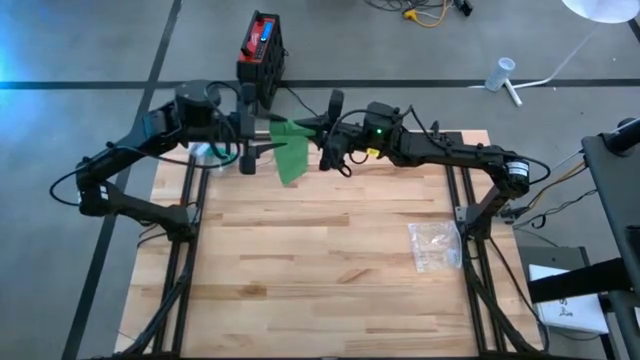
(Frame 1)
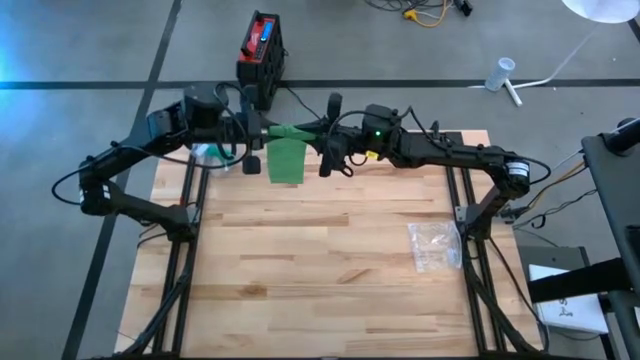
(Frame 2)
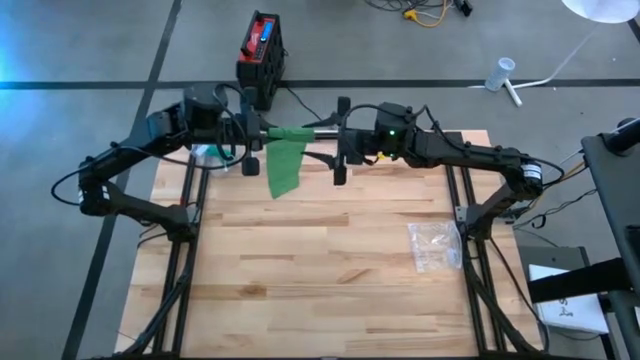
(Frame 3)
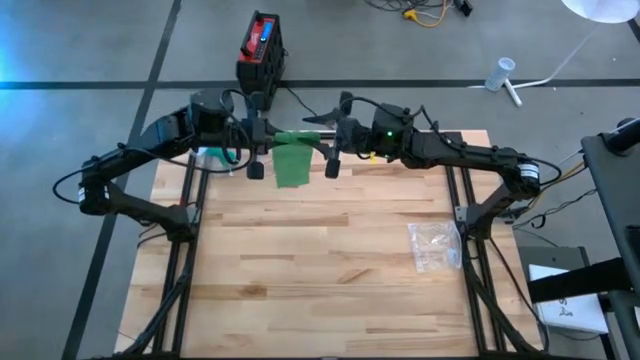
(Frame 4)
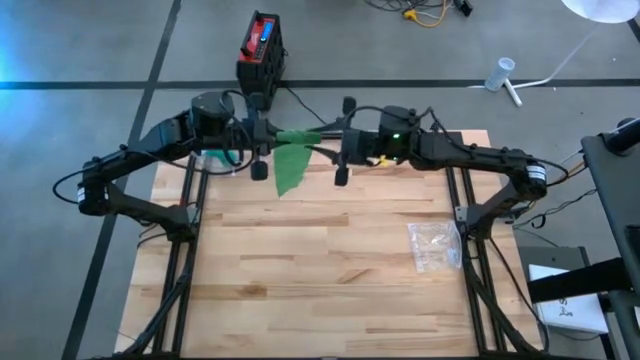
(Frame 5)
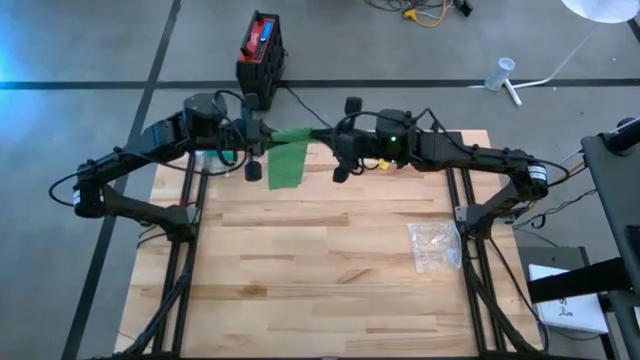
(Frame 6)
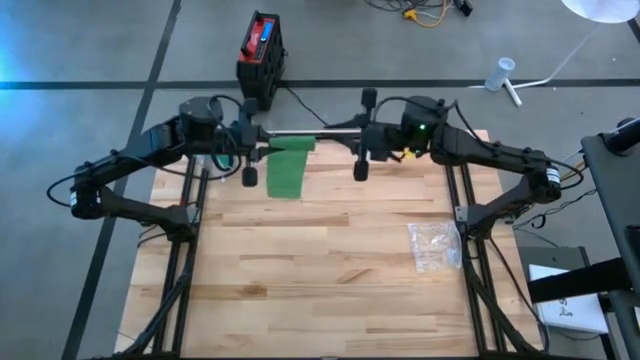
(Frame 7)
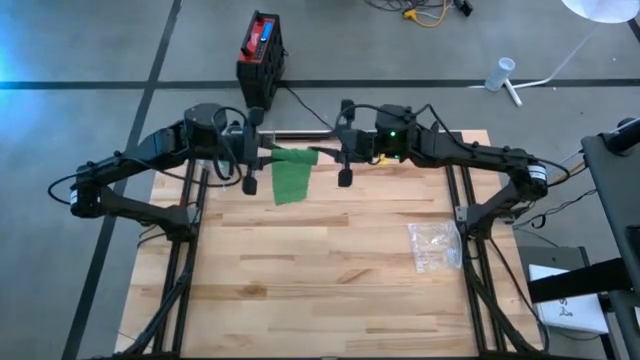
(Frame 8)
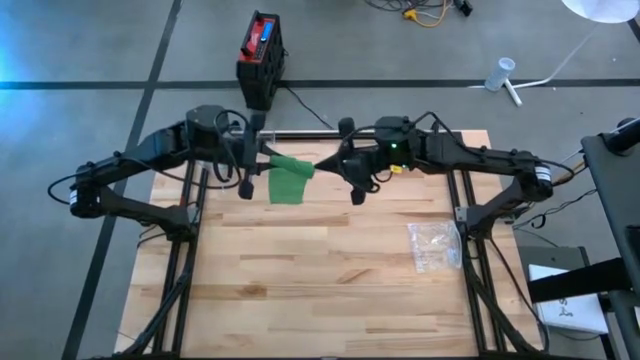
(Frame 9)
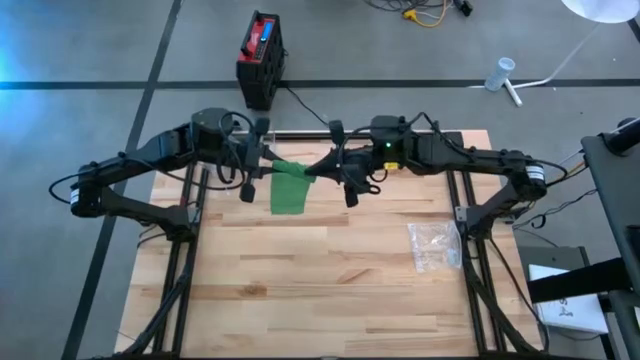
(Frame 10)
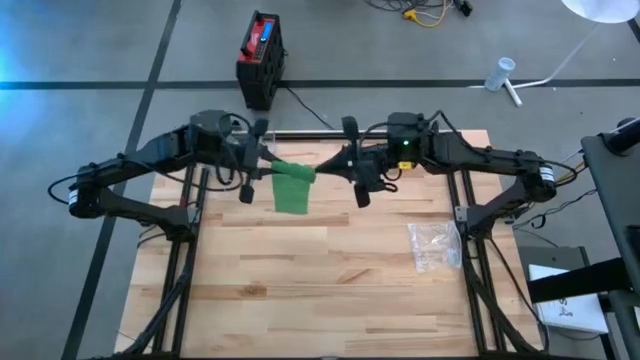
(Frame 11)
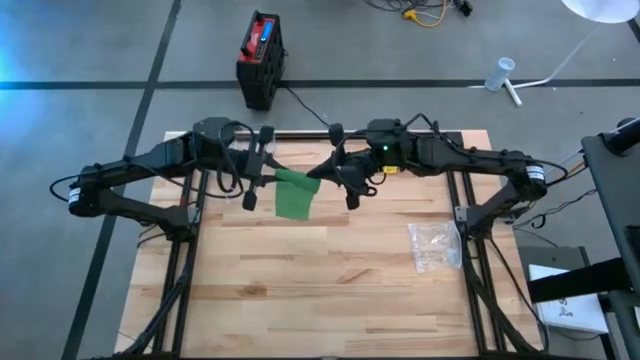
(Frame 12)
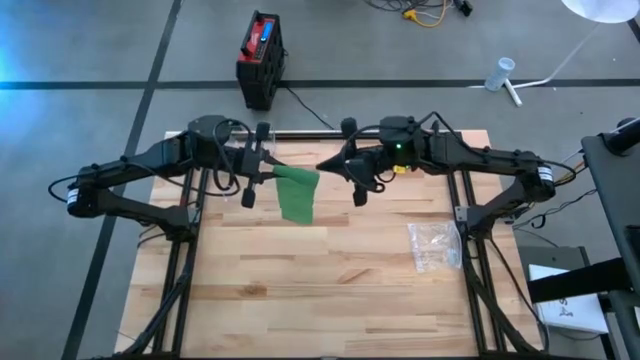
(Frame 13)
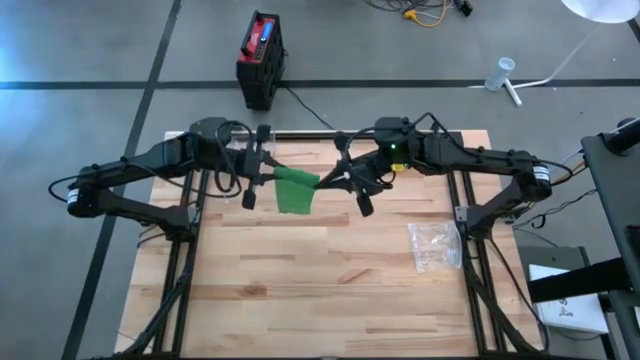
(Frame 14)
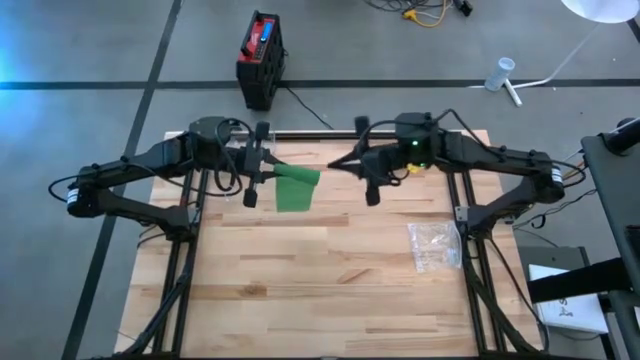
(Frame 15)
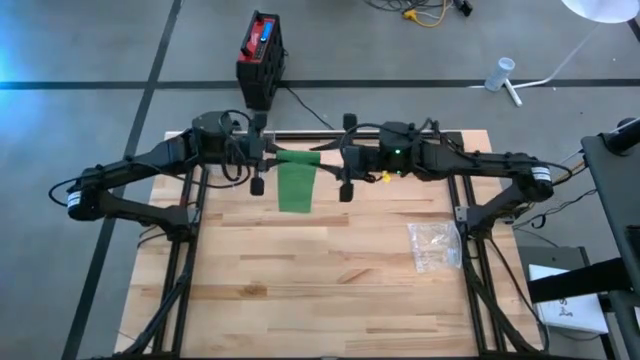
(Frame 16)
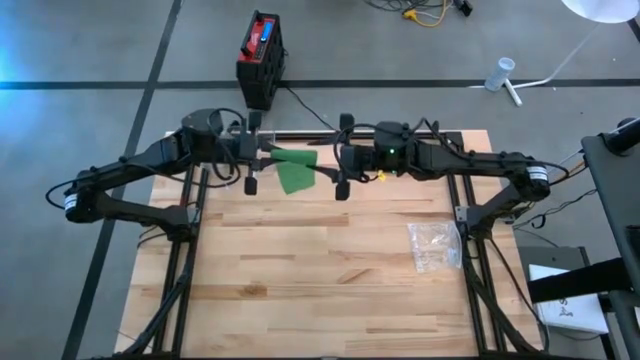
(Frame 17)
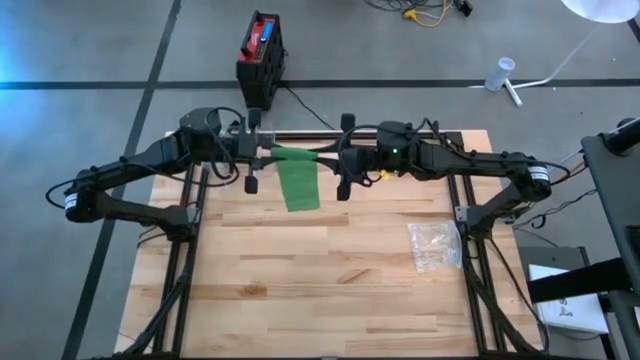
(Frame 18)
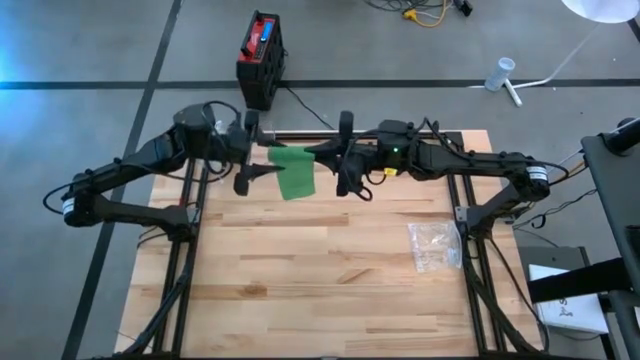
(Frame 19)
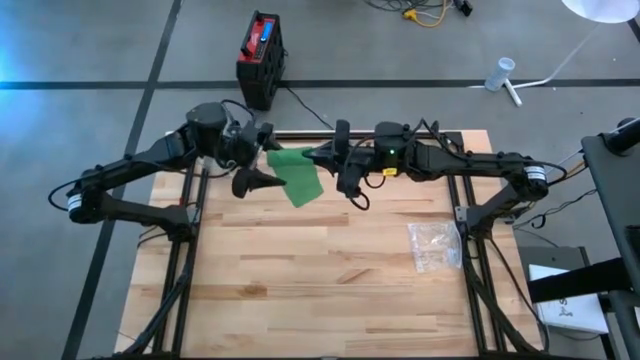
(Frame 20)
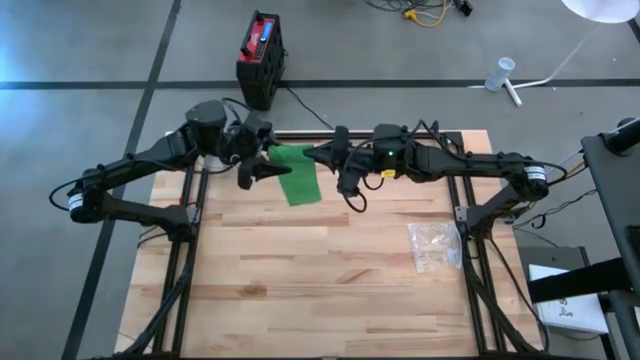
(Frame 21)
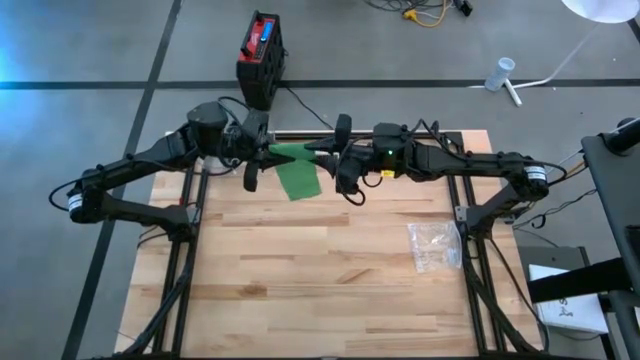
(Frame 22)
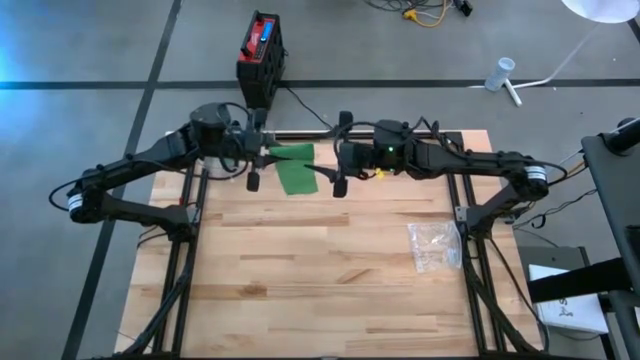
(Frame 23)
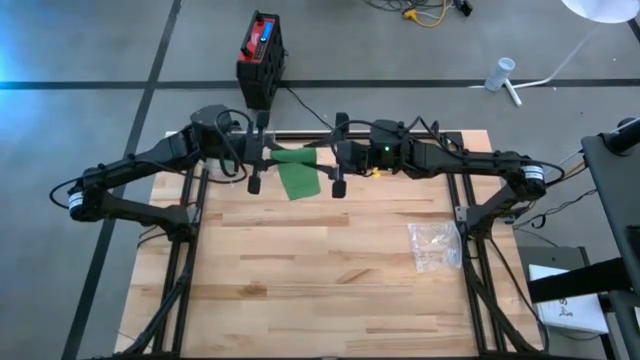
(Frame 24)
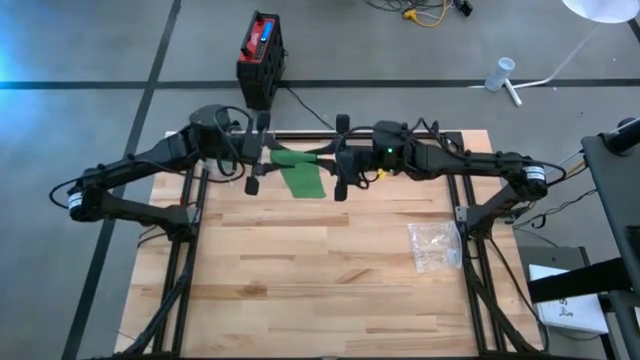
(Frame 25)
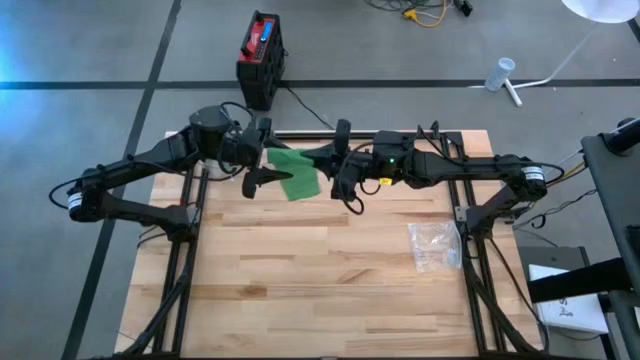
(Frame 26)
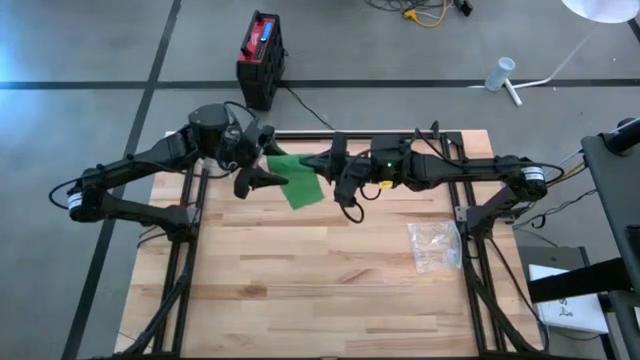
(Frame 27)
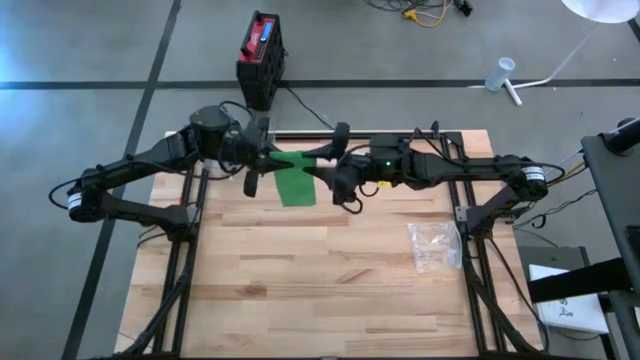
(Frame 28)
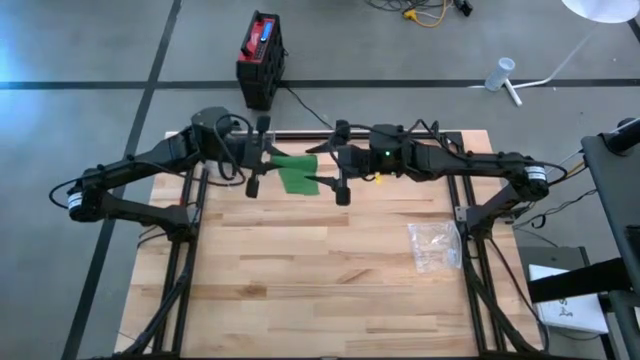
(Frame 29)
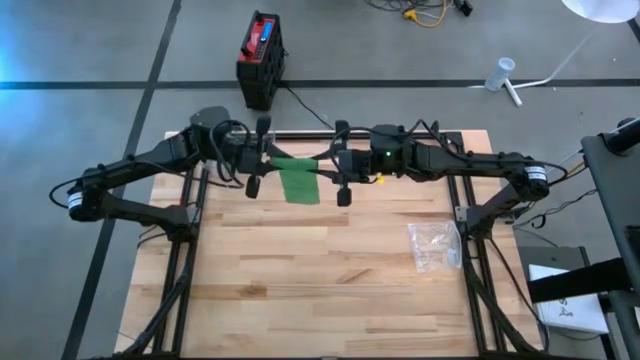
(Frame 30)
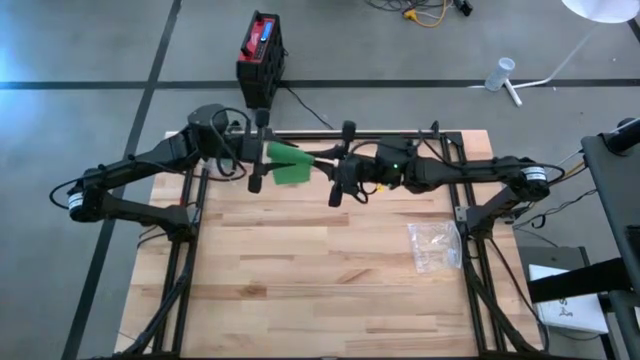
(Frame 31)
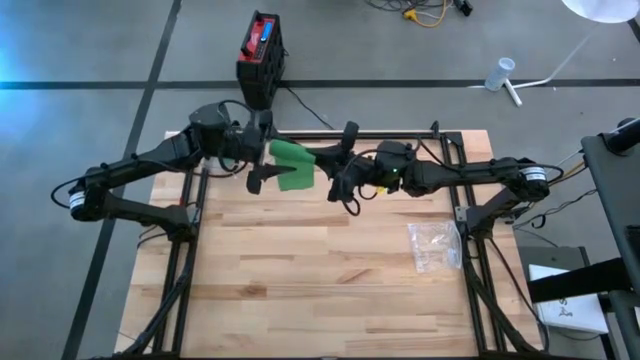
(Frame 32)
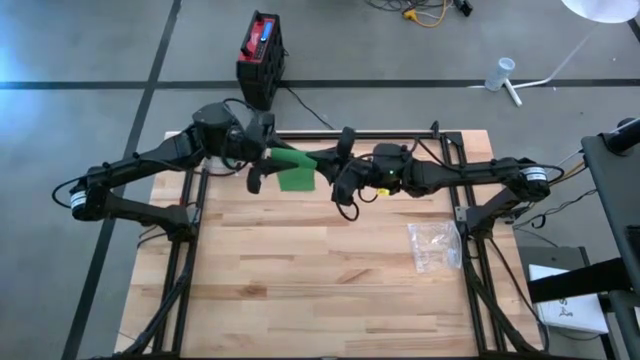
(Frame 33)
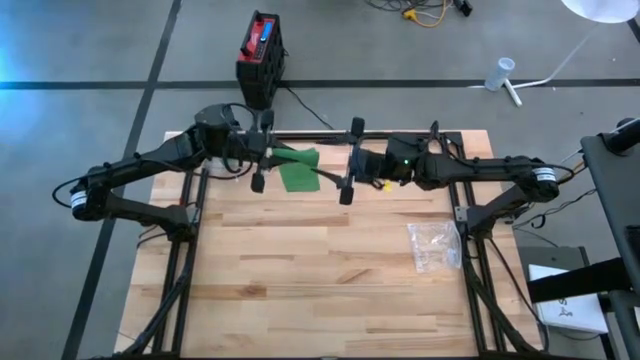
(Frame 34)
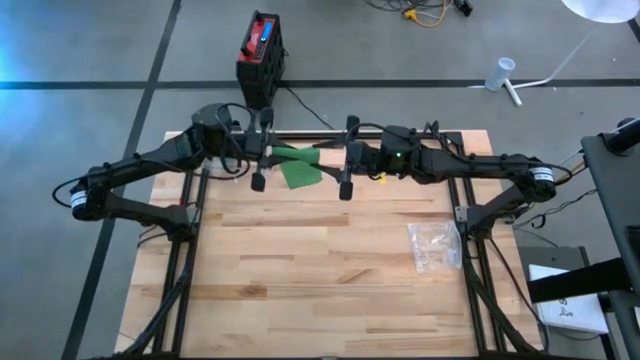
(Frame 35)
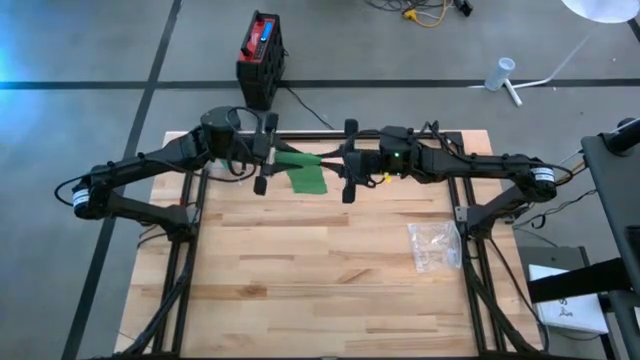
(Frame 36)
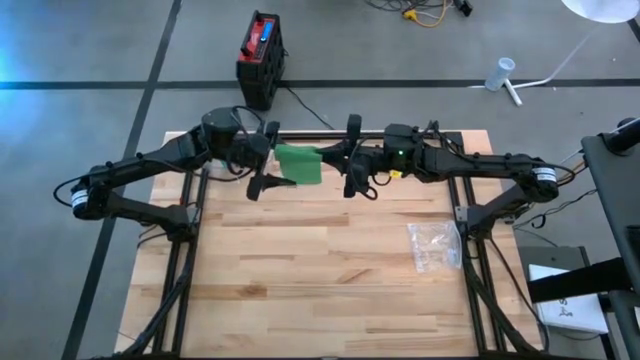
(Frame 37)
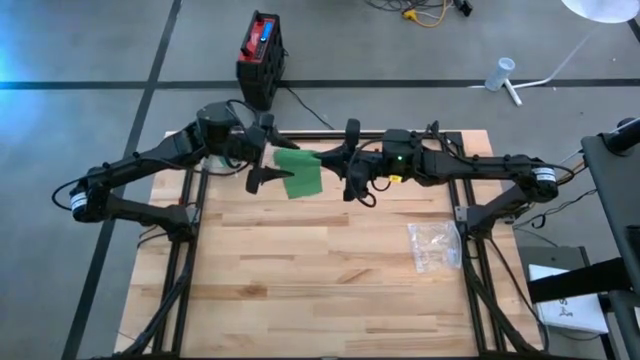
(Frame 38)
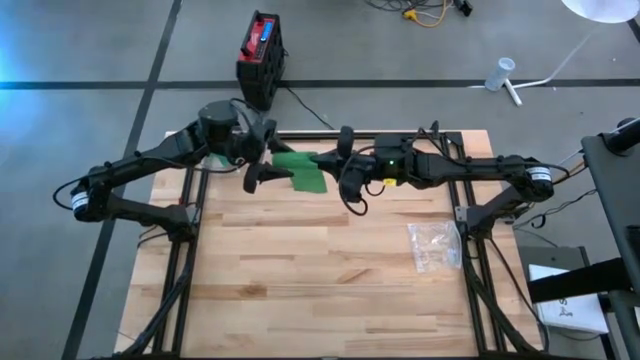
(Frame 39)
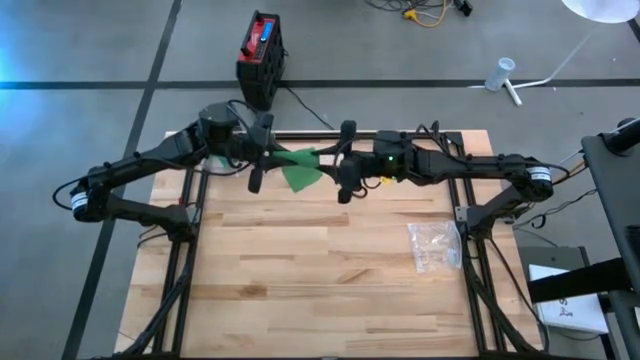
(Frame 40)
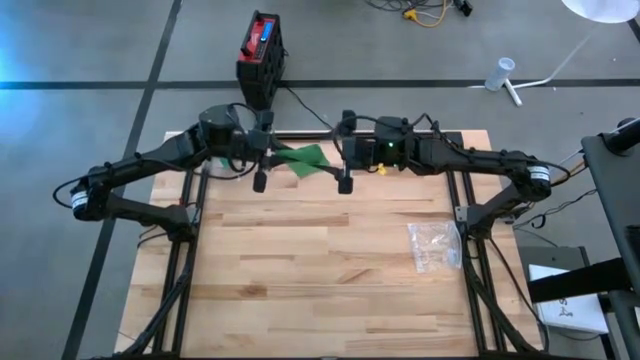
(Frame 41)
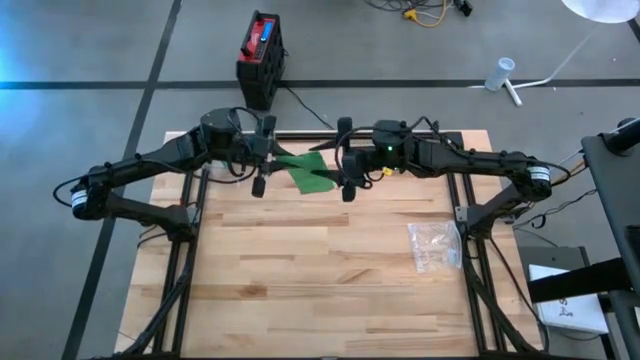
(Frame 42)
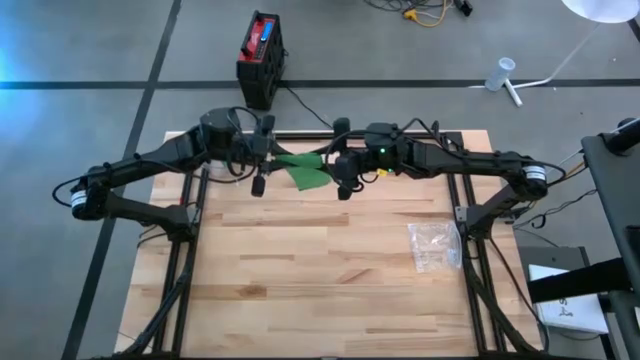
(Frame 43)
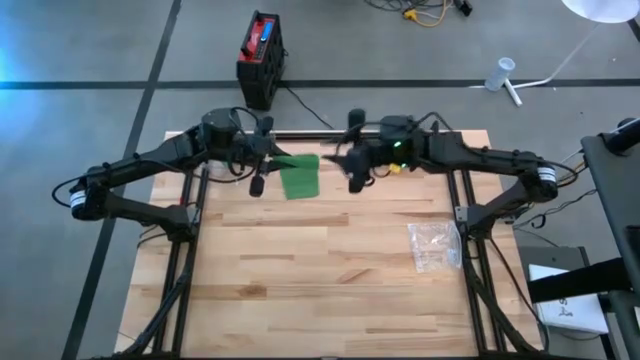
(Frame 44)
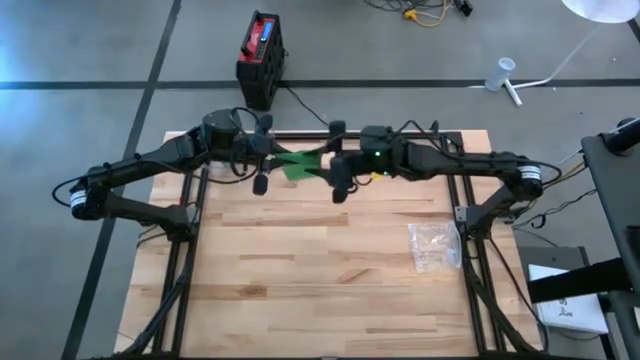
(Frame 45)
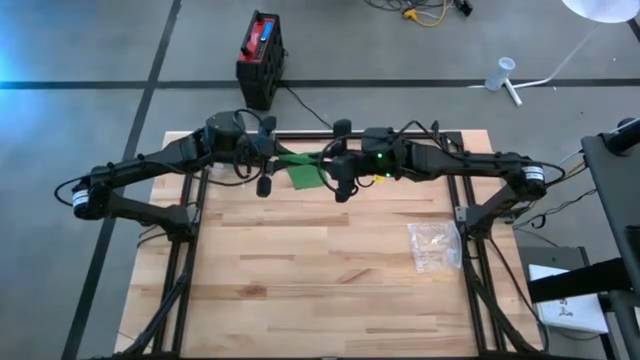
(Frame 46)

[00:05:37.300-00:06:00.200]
Task: Roll bandage
Roll the green bandage
